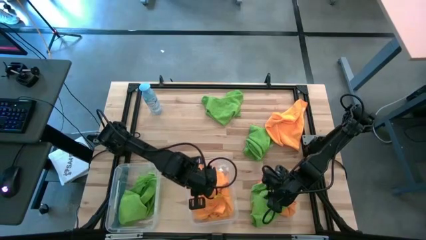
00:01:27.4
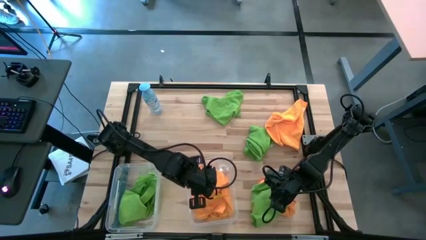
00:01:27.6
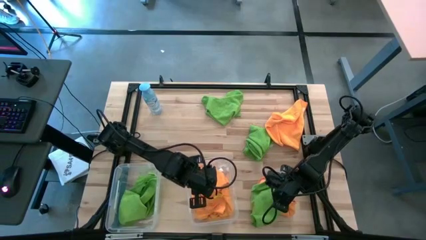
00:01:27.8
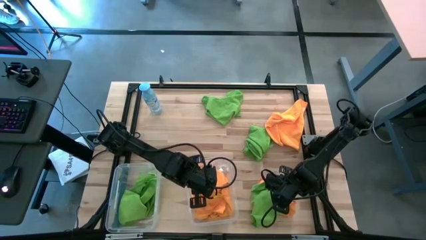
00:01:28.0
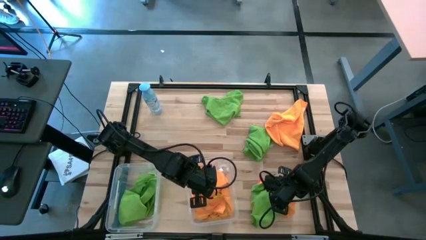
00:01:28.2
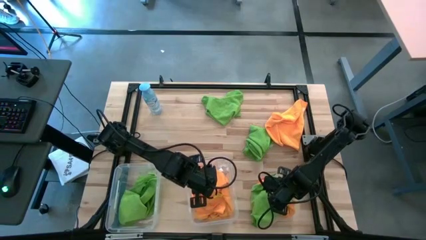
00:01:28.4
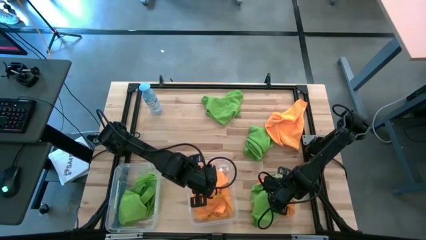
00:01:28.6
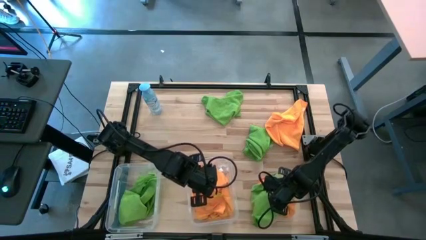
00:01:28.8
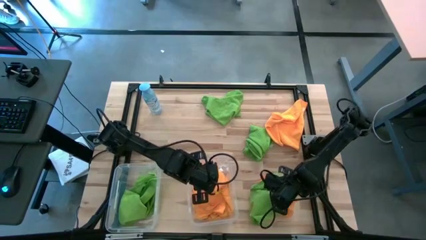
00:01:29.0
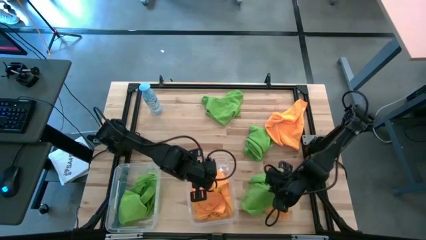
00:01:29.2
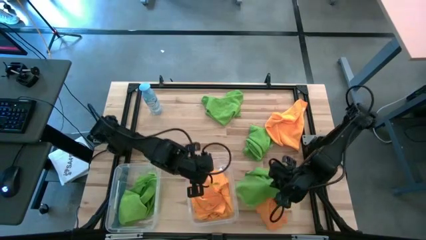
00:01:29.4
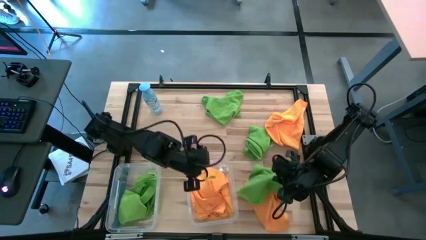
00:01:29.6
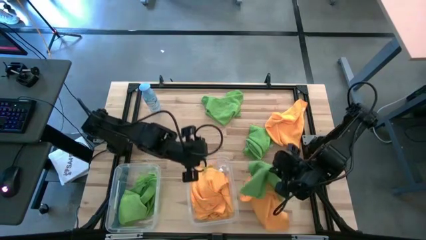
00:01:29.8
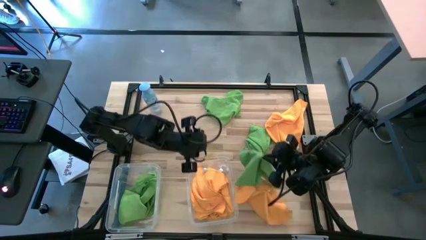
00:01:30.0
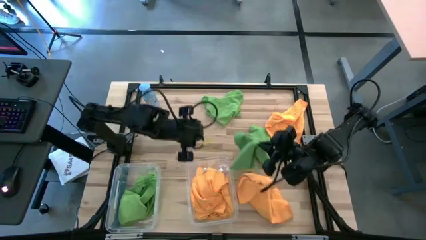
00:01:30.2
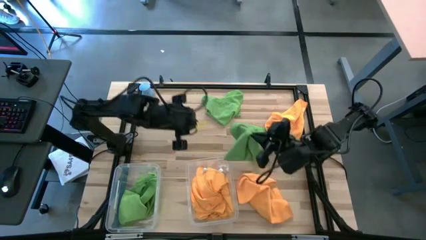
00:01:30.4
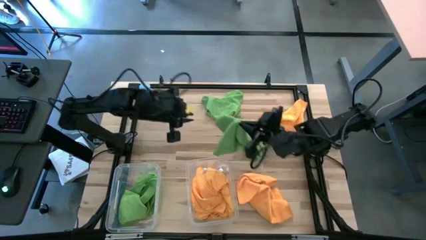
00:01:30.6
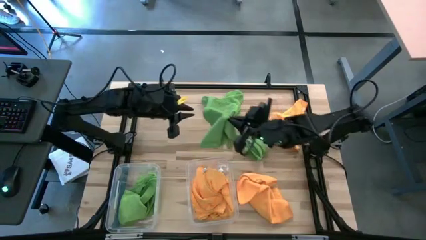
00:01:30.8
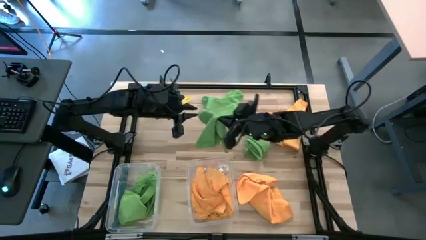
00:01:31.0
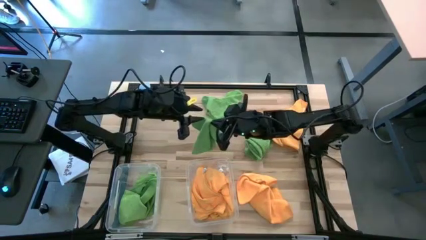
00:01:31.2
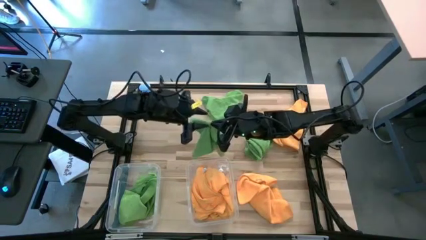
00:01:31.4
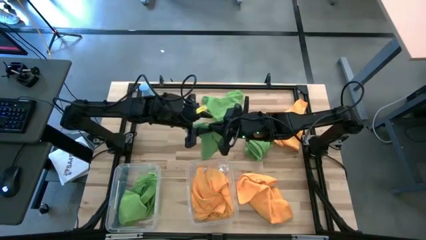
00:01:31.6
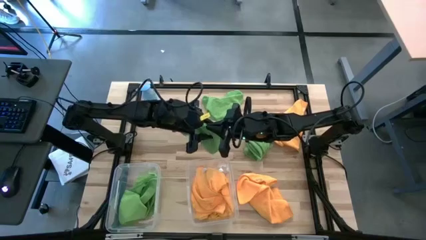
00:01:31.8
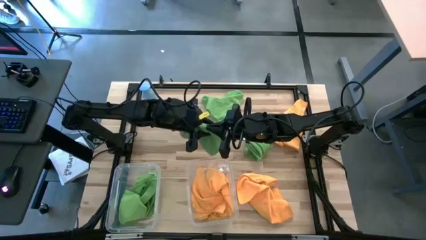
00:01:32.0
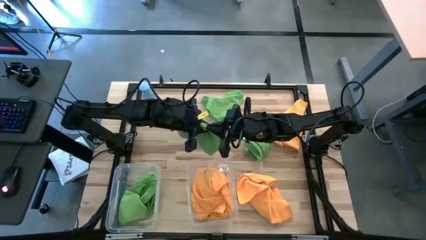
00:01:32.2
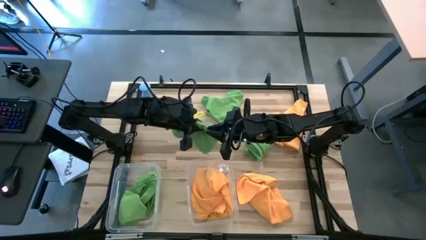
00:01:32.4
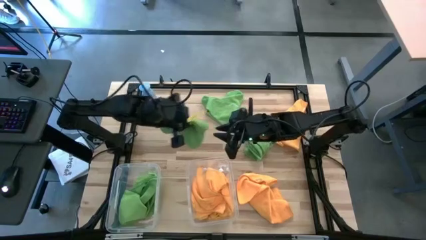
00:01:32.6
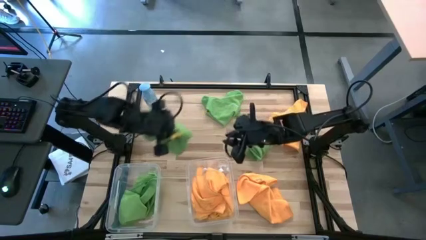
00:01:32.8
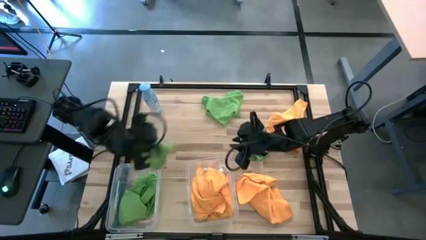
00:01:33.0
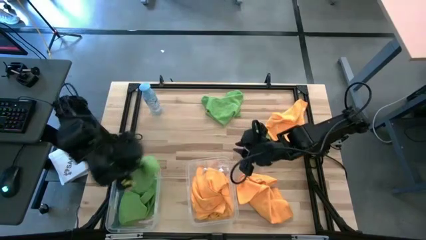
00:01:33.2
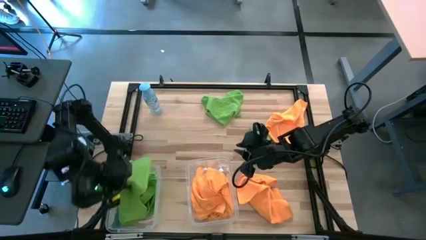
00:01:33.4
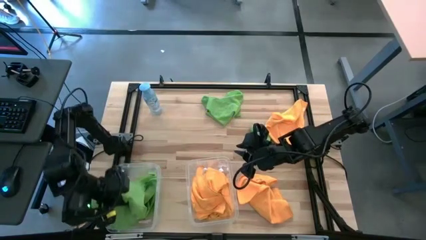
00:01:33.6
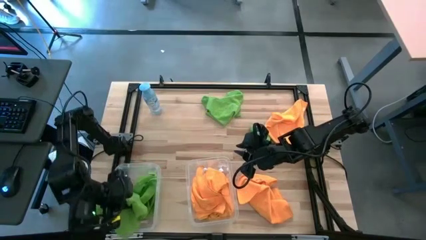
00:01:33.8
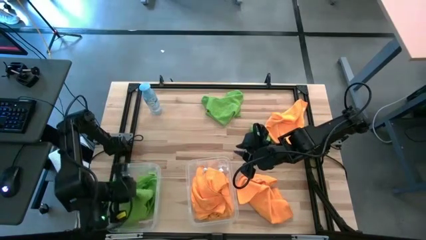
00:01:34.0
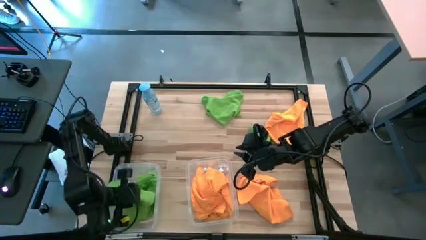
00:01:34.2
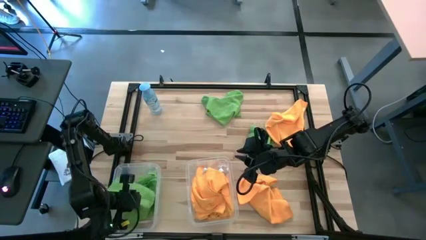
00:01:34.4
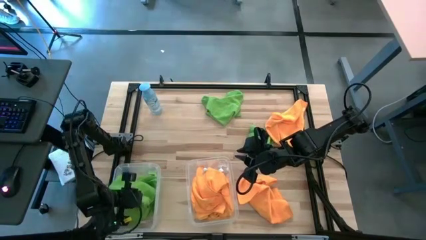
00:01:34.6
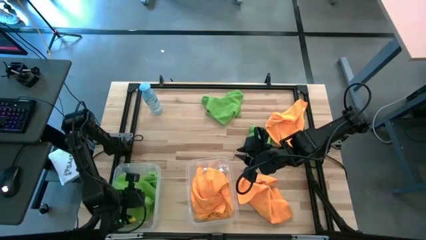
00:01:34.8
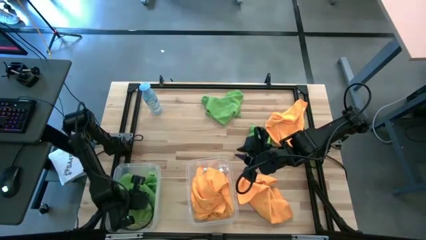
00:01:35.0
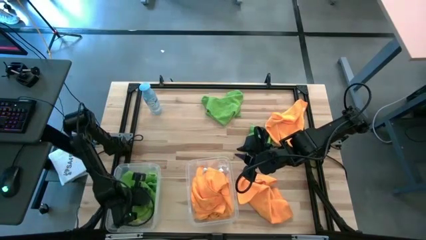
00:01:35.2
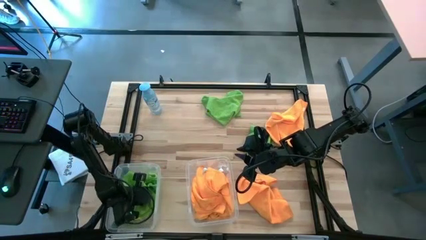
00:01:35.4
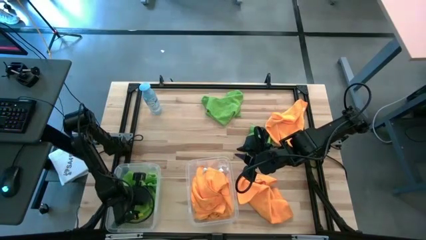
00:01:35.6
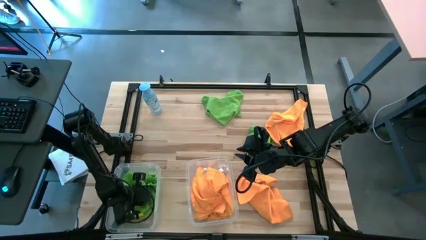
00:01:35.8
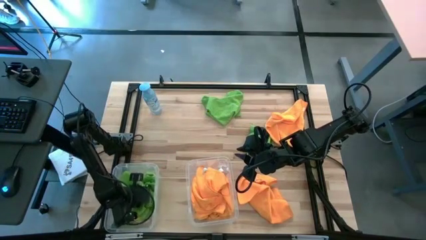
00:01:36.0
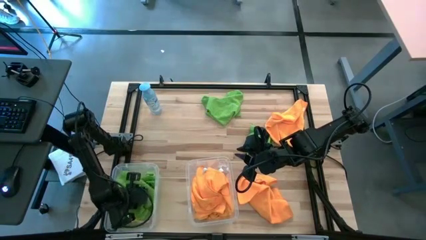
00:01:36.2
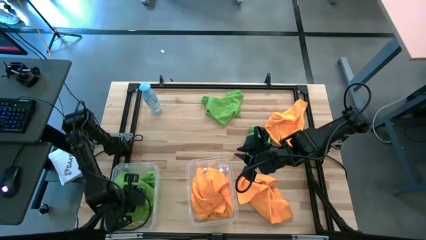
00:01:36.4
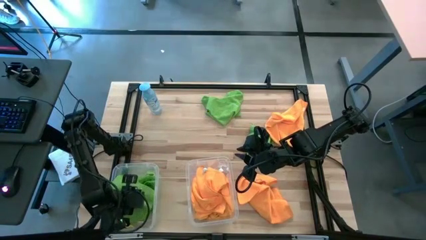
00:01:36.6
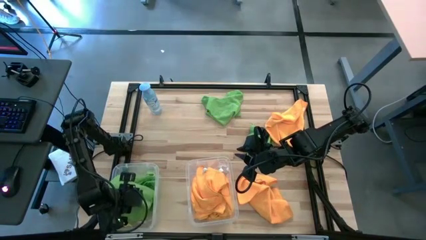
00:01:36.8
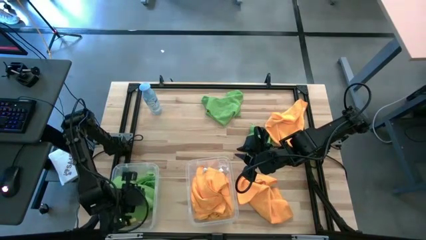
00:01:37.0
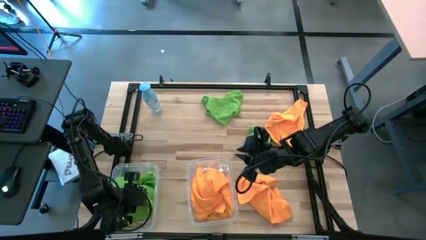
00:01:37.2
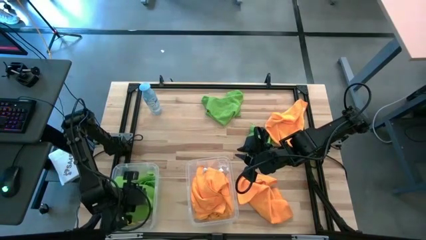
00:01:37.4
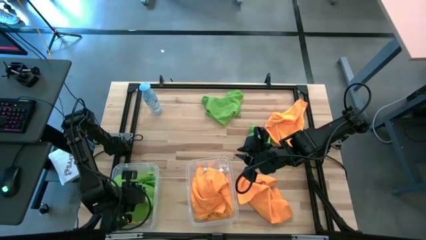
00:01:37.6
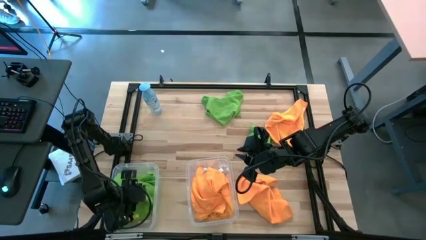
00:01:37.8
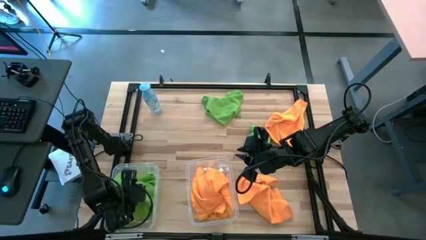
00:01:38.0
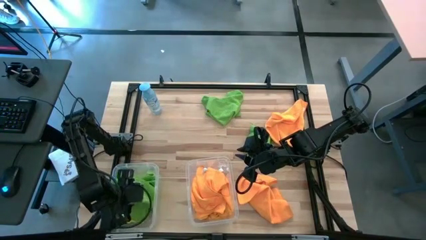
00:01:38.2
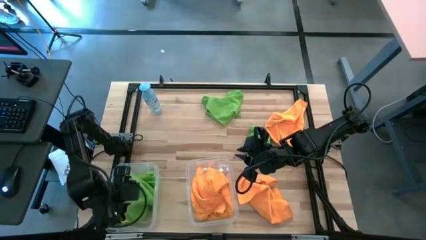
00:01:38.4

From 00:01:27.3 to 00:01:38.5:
Task: Sort microfiber towel by color & place in baskets
Put the green towel into the left transparent bin

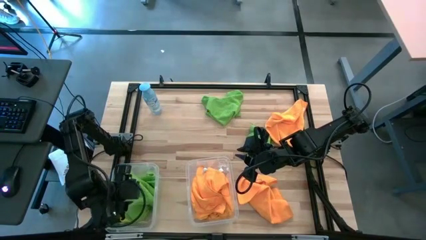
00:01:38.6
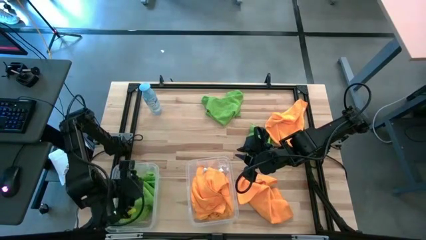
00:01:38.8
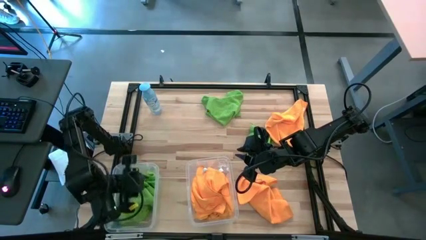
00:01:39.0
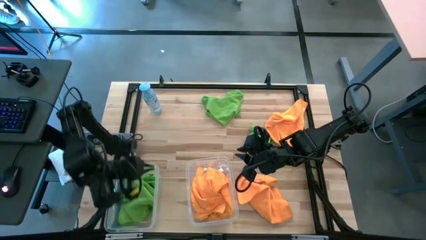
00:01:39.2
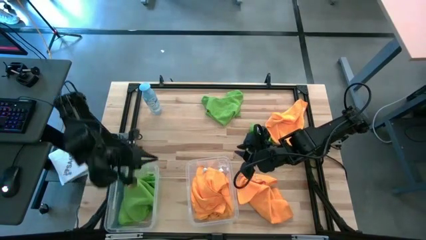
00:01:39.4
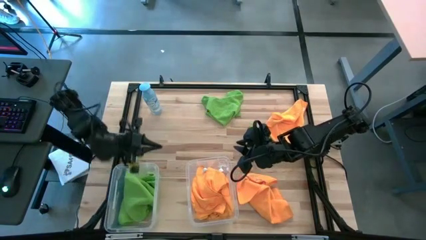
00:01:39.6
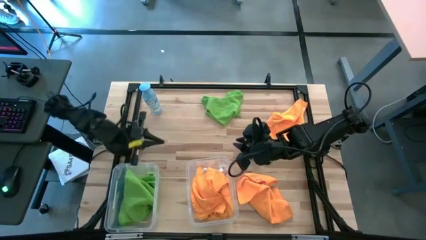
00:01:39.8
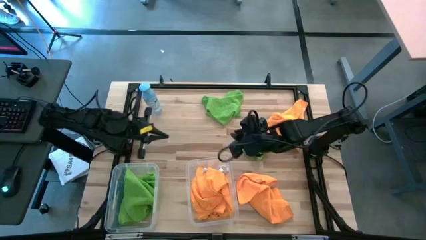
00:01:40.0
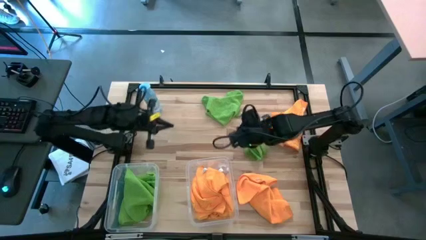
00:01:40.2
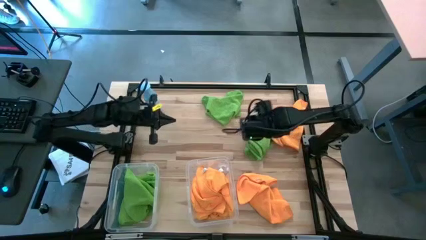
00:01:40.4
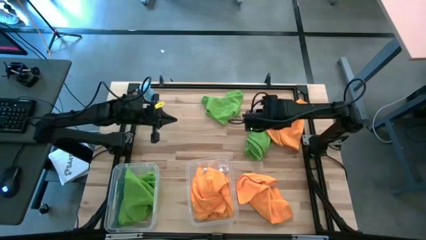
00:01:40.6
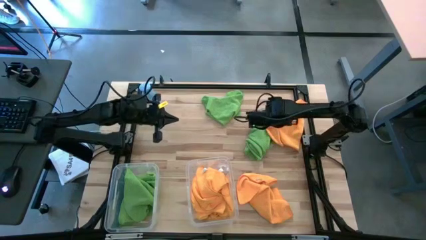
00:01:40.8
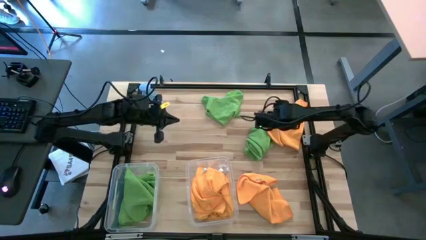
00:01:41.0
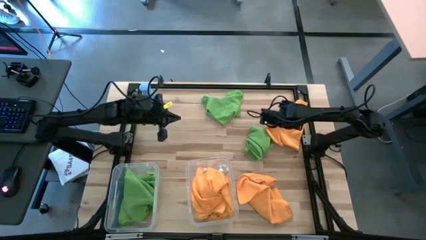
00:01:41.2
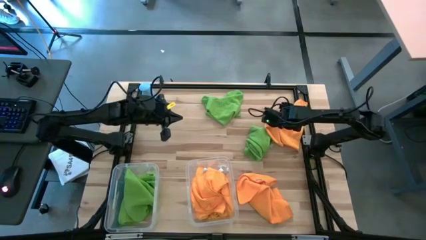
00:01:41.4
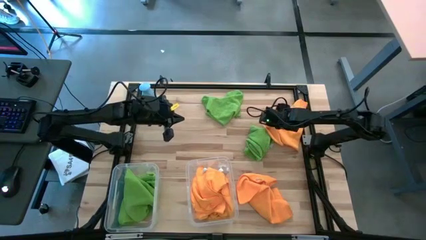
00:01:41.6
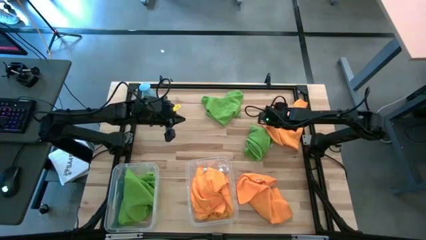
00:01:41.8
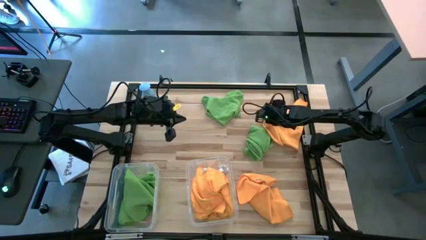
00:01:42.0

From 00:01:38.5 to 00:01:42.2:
Put the orange towel into the right transparent bin

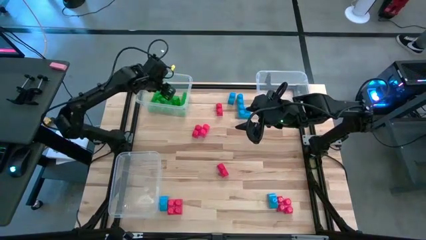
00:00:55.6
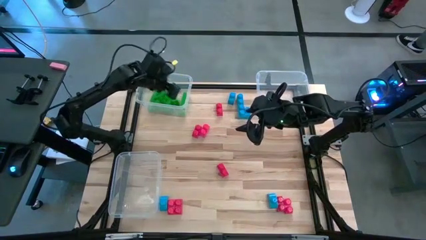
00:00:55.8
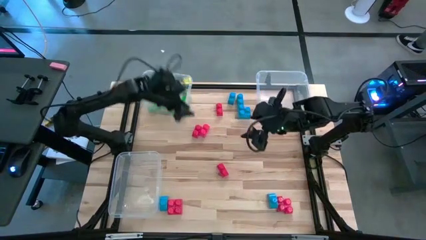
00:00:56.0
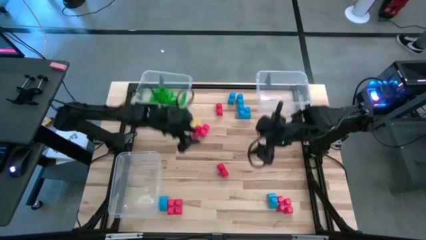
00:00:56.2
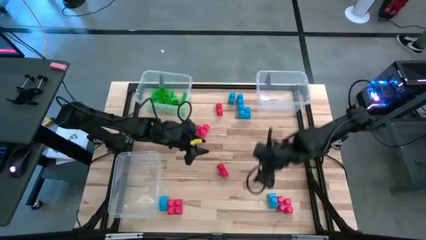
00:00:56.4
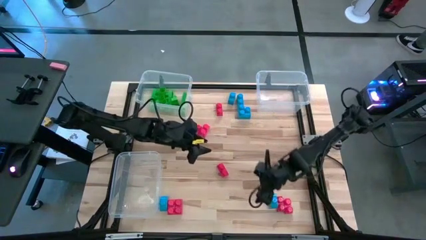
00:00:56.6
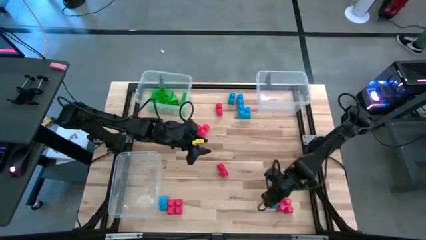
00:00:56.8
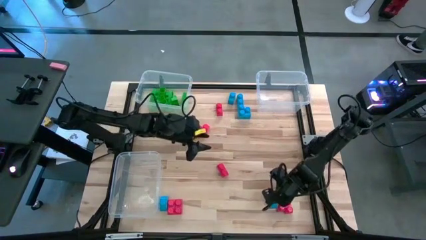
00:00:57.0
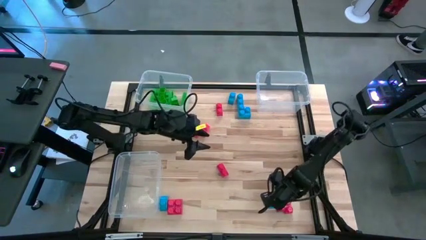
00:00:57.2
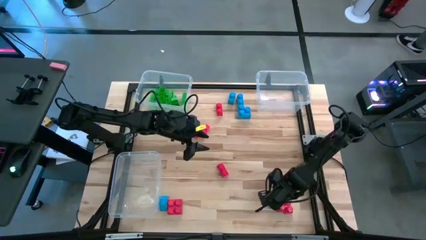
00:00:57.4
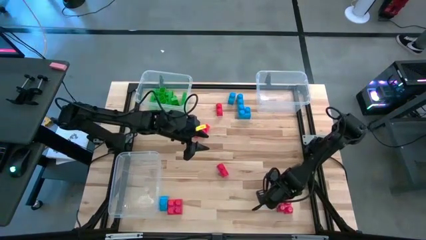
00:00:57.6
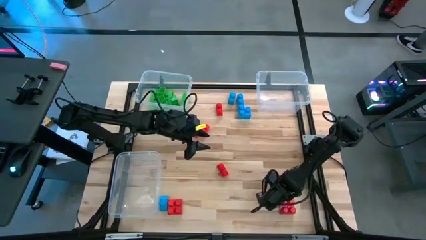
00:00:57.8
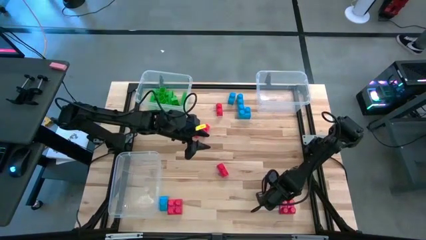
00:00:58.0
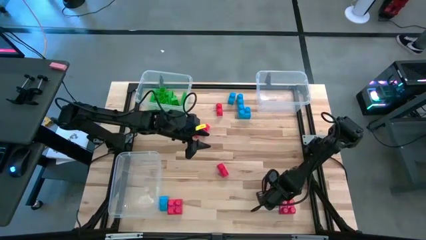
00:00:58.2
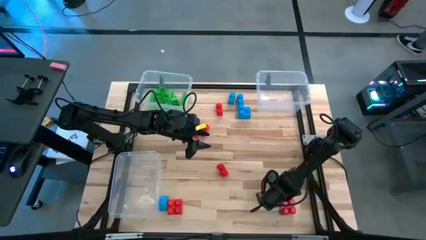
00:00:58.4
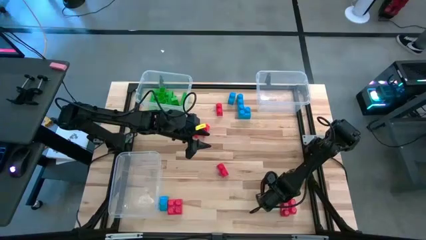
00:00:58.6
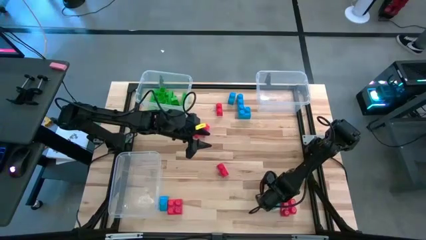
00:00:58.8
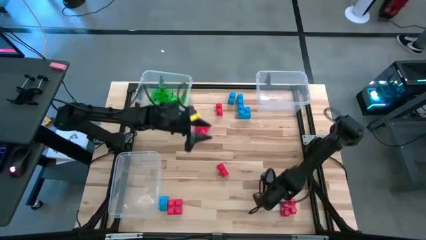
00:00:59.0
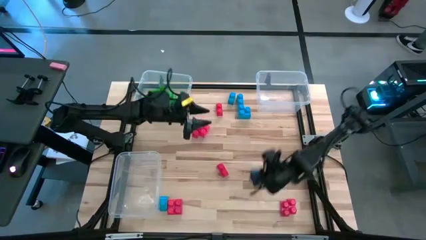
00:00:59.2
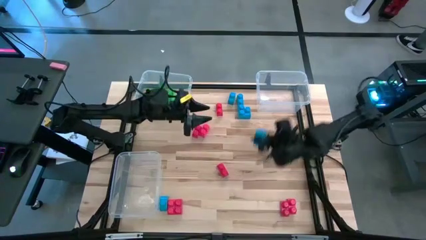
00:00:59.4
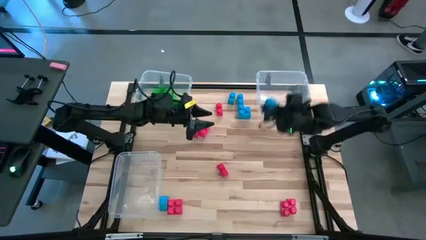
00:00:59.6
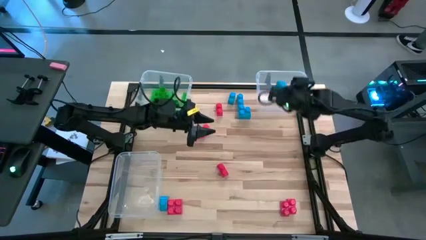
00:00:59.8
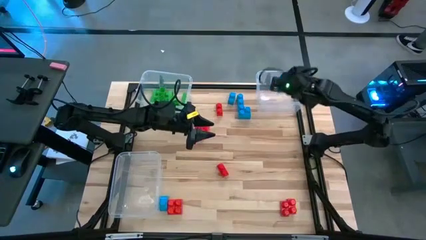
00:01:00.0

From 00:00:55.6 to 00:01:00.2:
Task: Sort blocks
Put the blue game piece into the top right transparent bin
